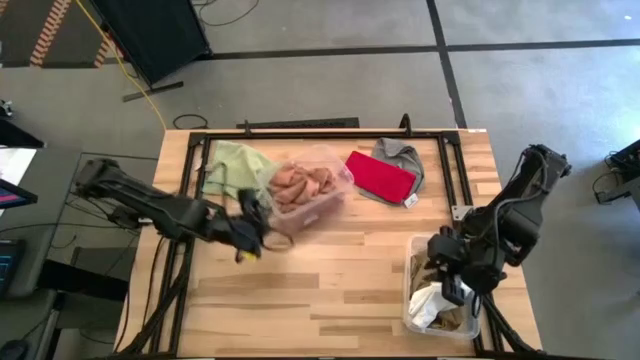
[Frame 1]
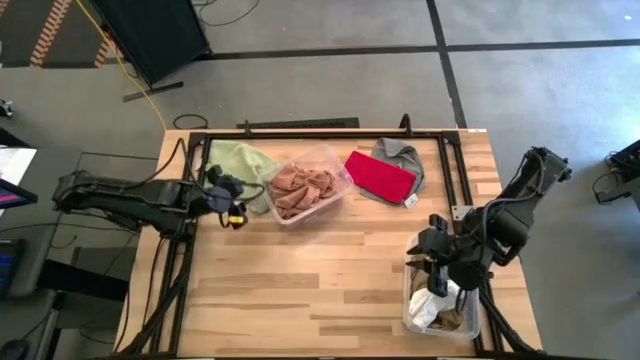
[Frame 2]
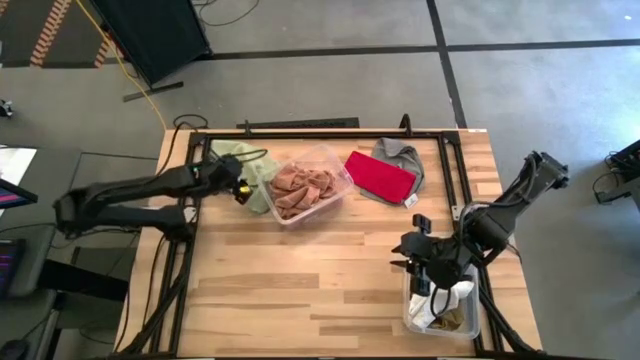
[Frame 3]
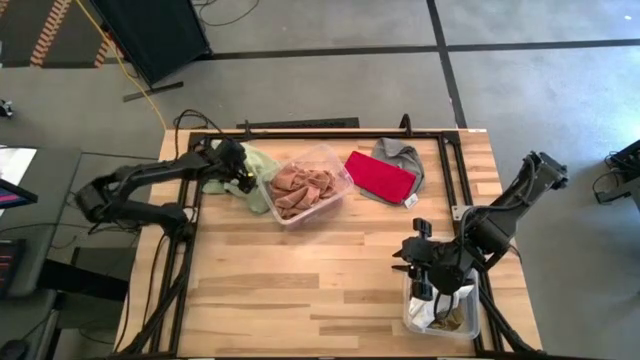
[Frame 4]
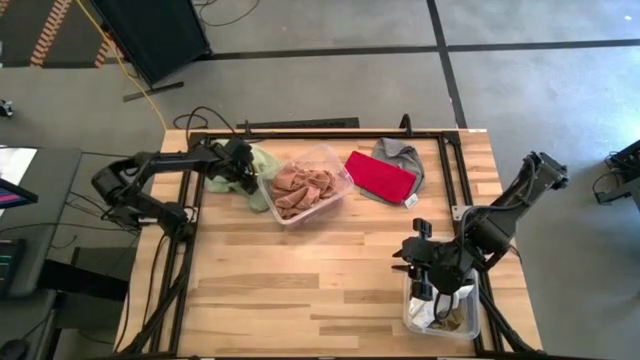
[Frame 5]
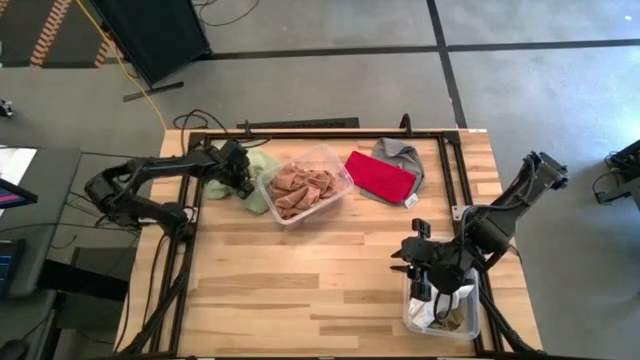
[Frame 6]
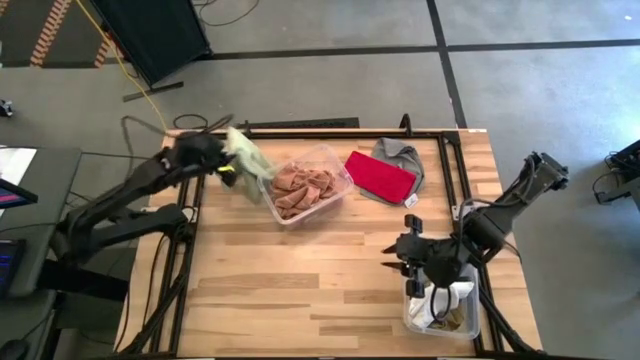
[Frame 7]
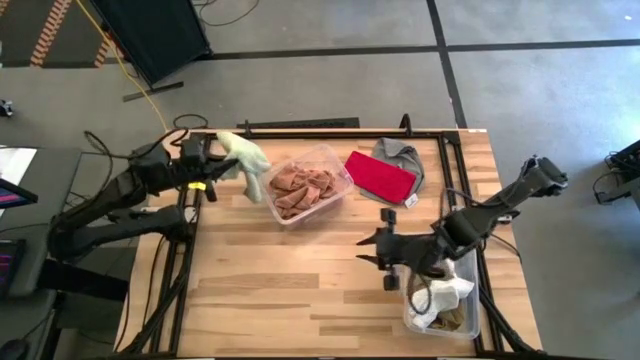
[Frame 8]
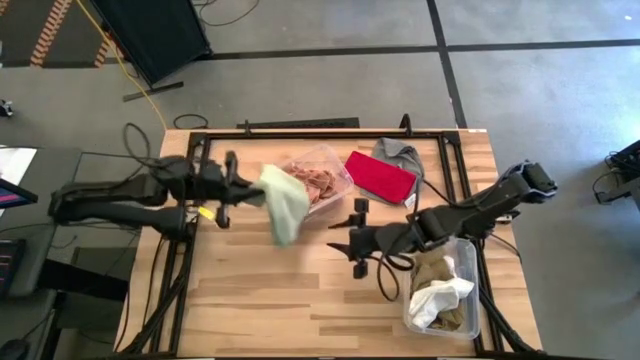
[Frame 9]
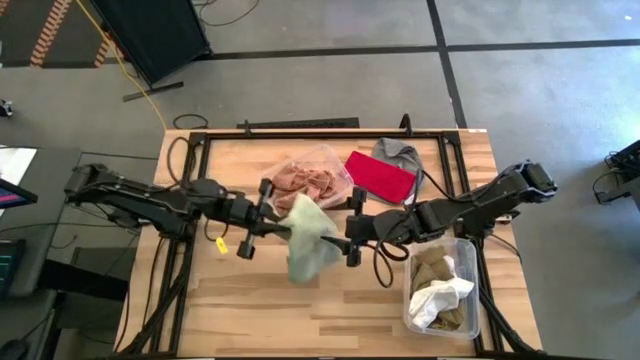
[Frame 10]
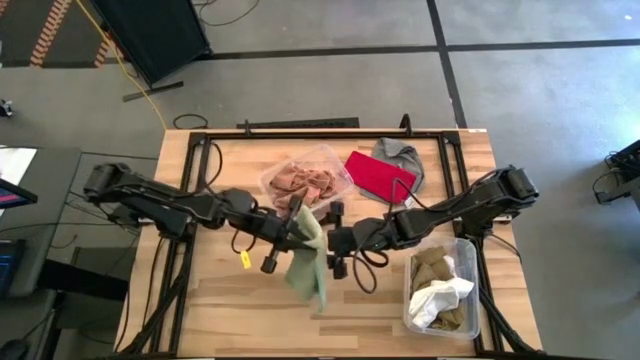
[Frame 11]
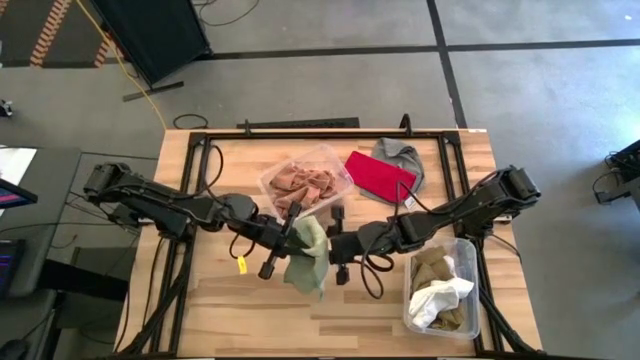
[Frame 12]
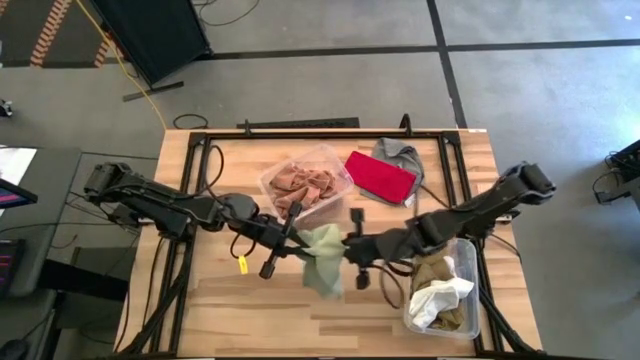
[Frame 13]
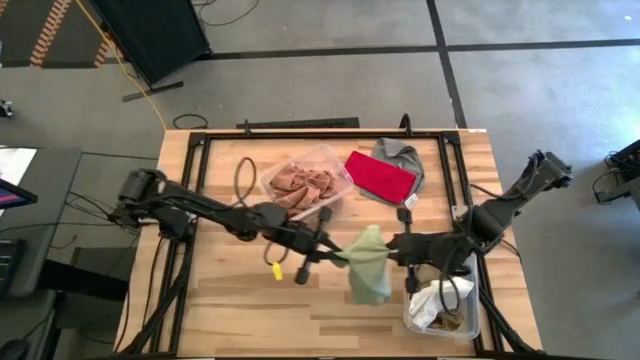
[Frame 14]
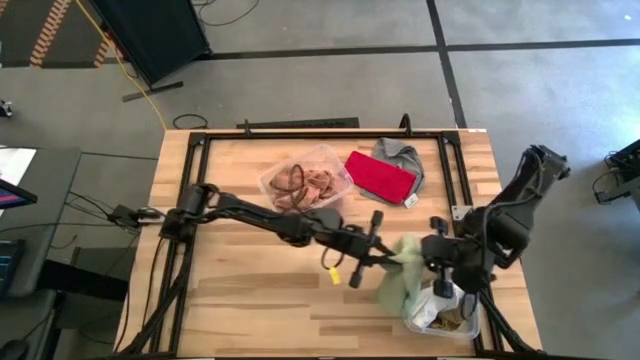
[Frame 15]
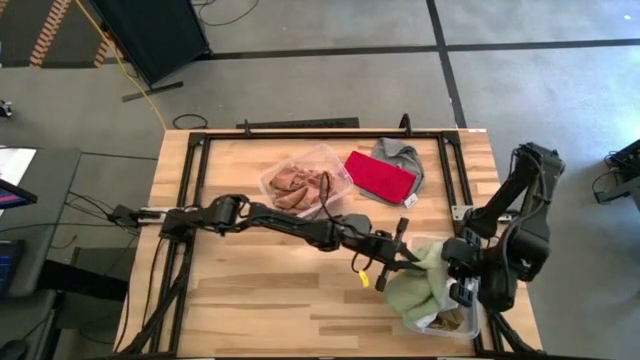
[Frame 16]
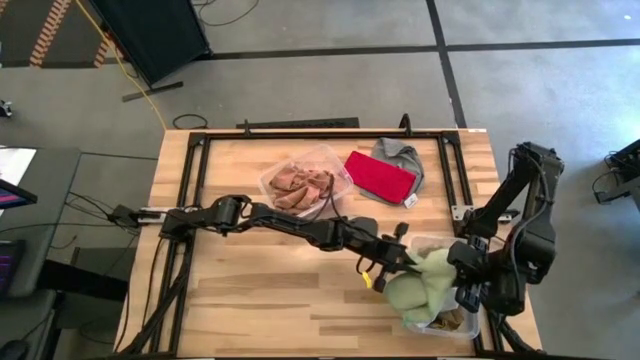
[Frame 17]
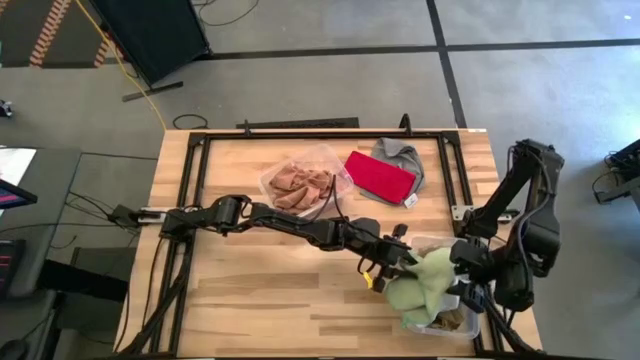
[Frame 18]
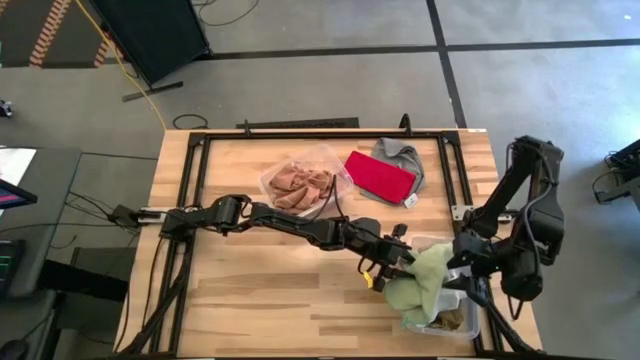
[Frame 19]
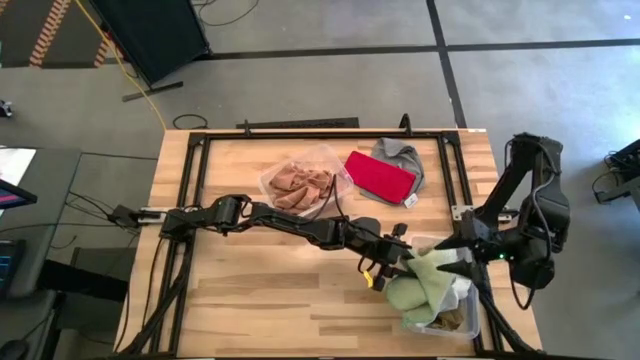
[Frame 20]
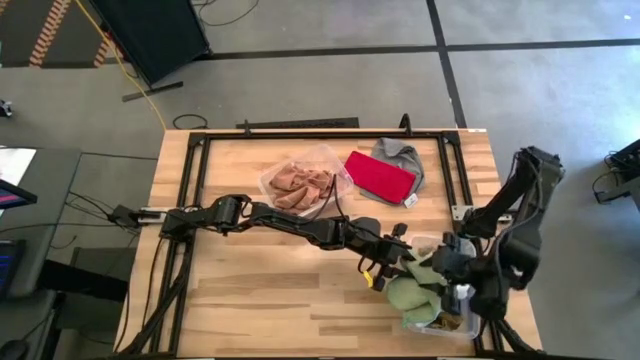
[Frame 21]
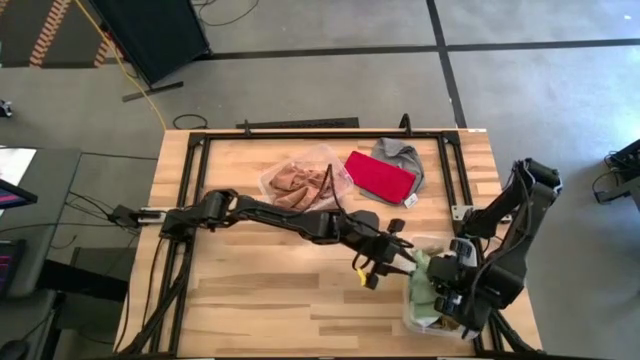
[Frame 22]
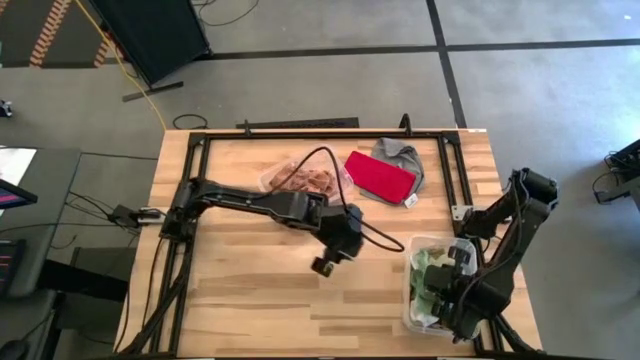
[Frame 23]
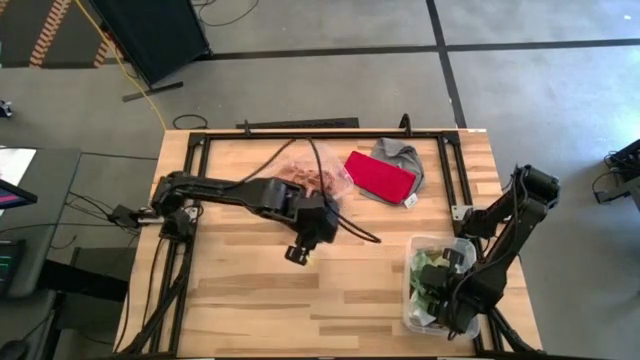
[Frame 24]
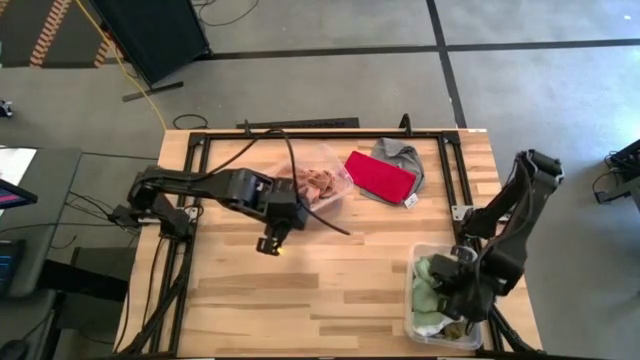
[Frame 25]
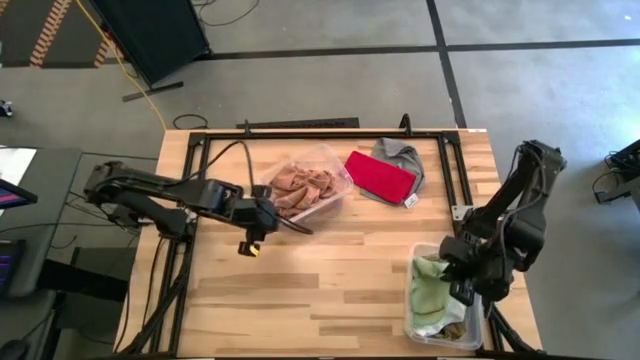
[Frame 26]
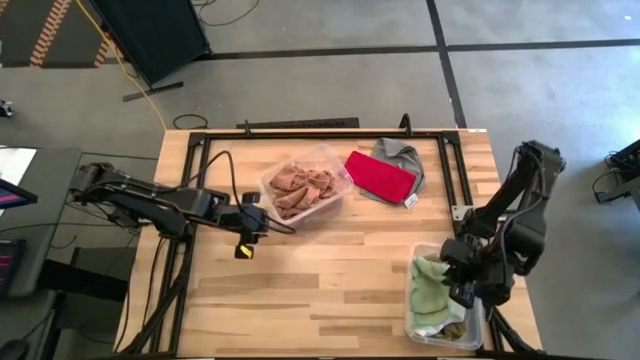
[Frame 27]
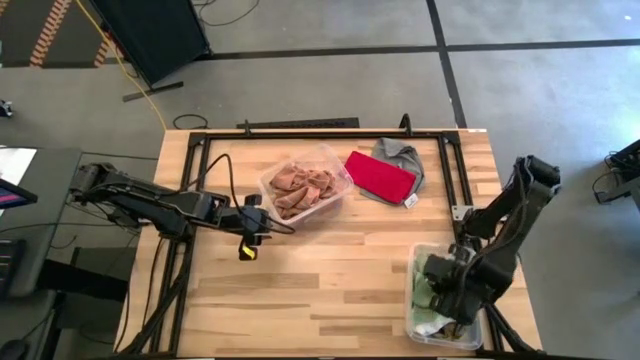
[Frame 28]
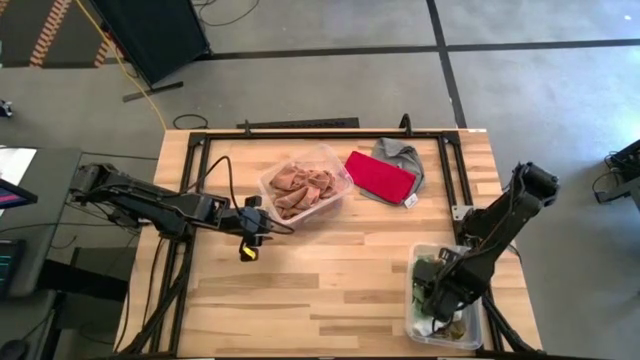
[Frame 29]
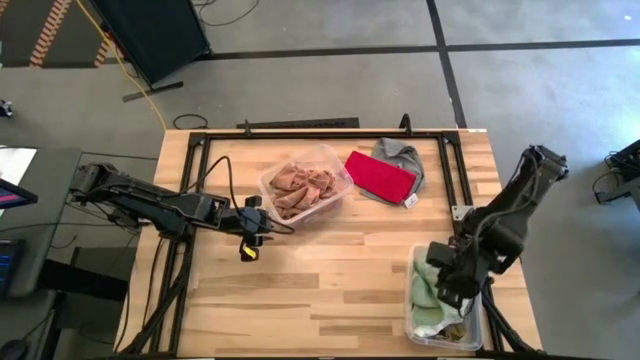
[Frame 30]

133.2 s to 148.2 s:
Task: Sort towels by color in basket
Put the green towel into the bottom transparent bin

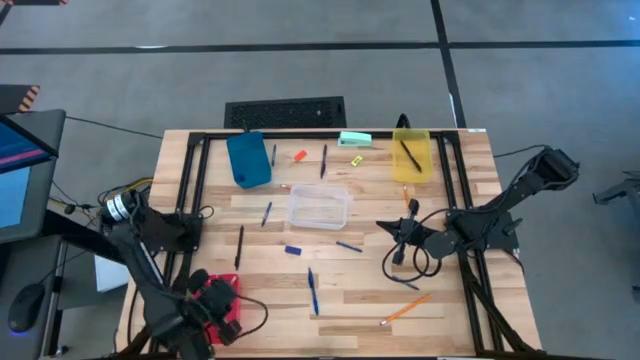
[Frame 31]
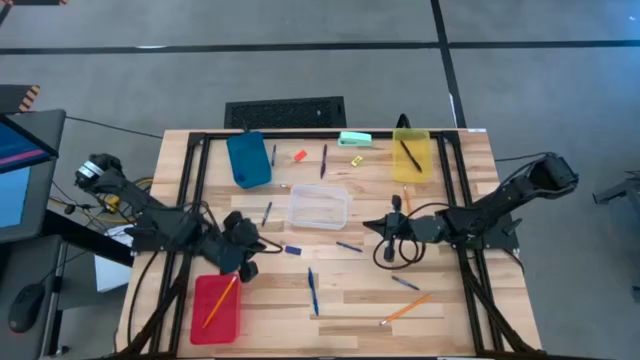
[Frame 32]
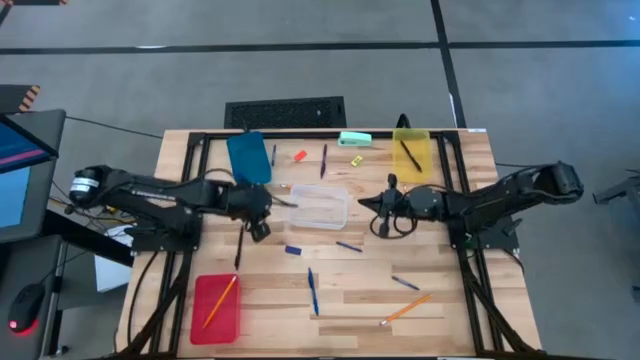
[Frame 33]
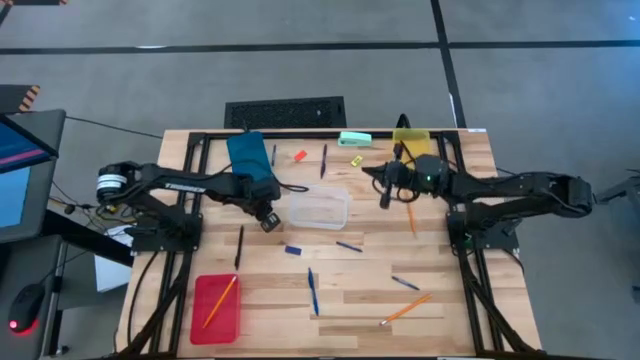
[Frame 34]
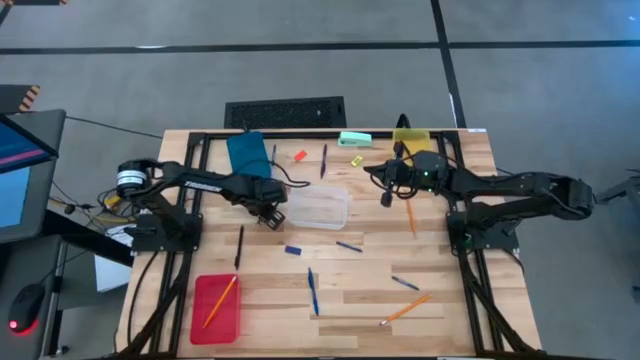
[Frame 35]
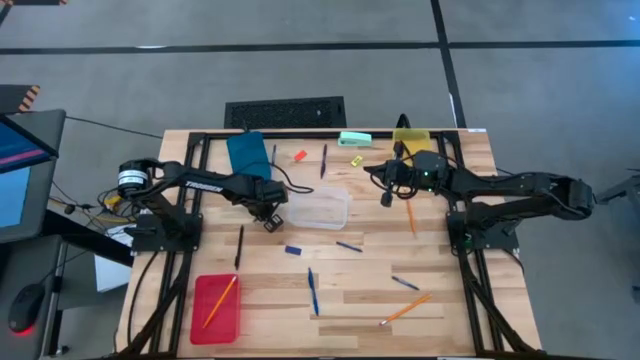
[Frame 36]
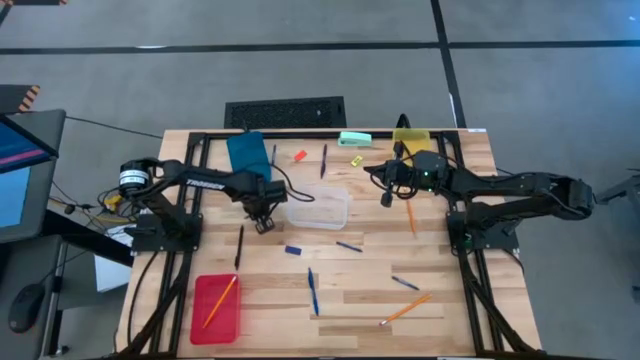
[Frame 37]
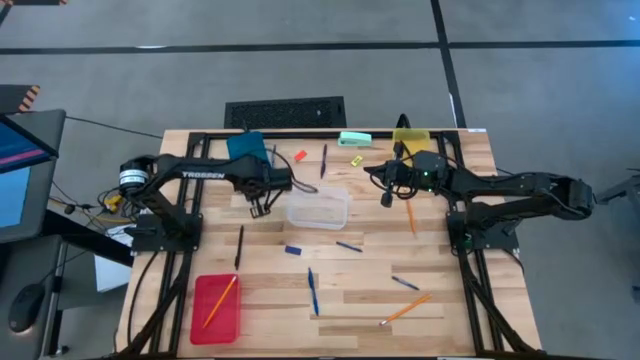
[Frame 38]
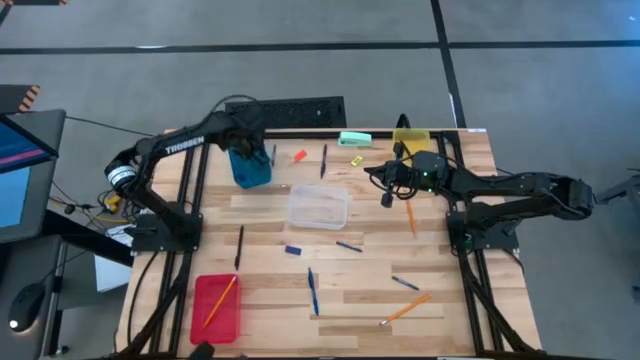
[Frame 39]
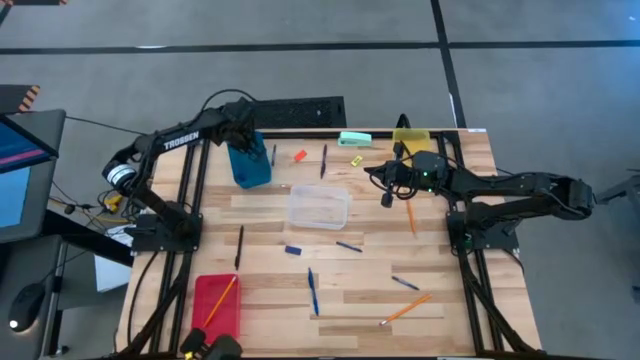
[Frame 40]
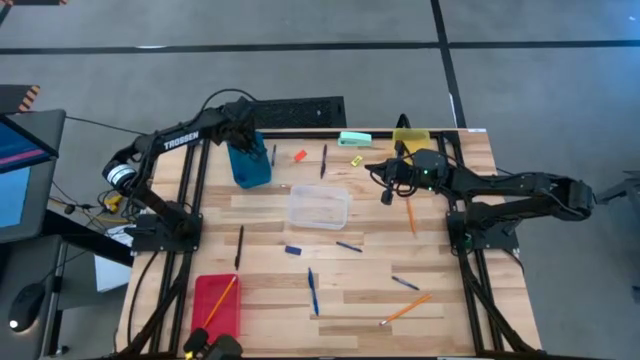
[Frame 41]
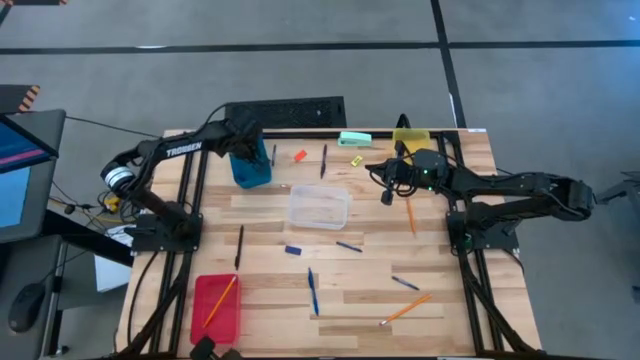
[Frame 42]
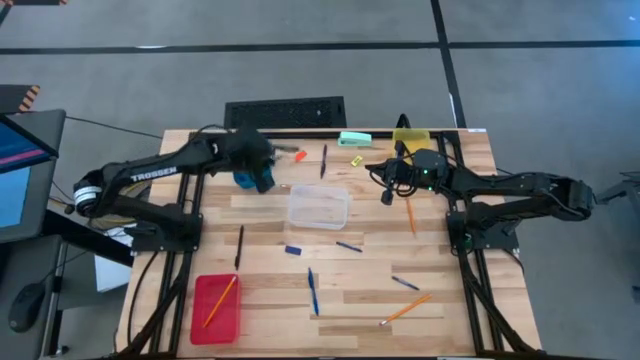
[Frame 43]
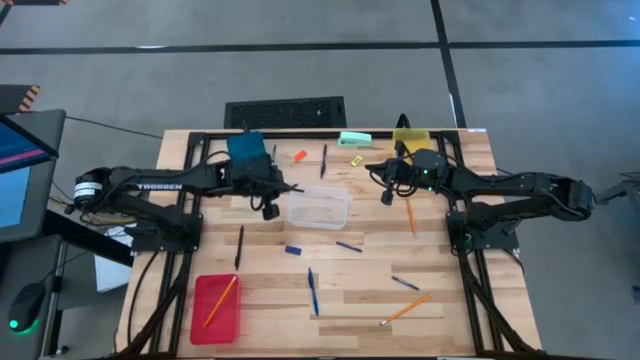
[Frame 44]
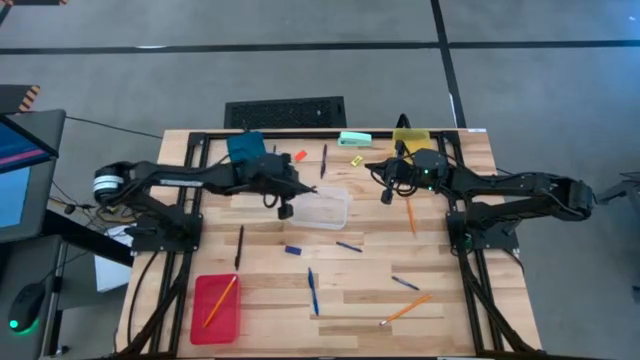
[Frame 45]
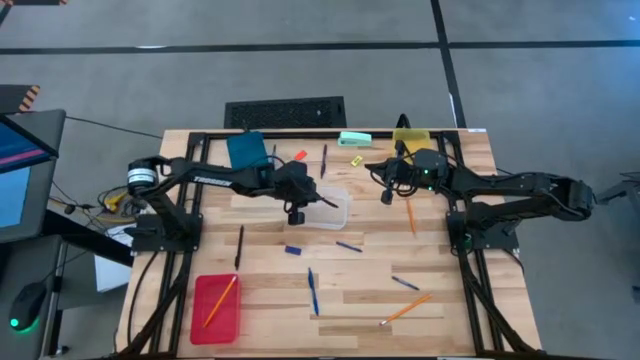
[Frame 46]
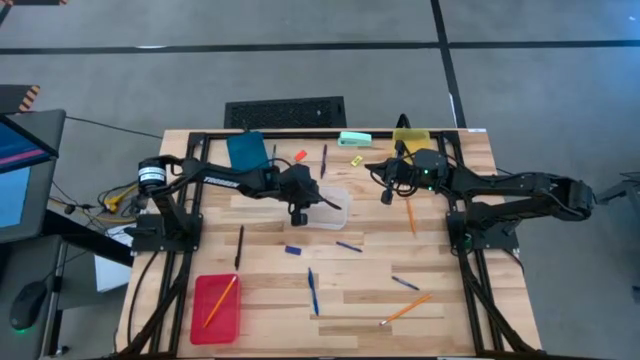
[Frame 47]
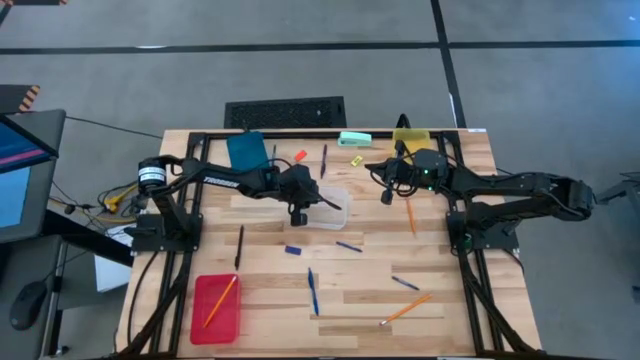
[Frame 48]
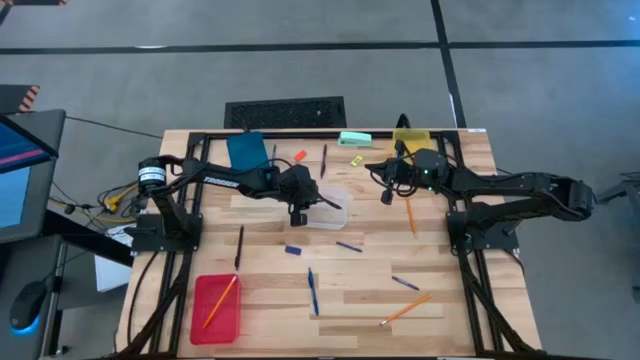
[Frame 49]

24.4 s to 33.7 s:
Task: Sort crayons/erasers/pens/pencils in bins
Put the bottom left blue crayon into the transparent bin
